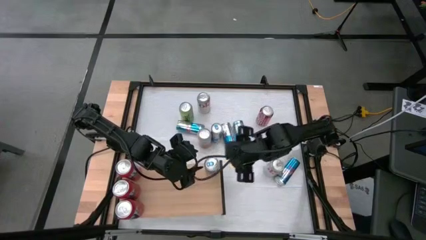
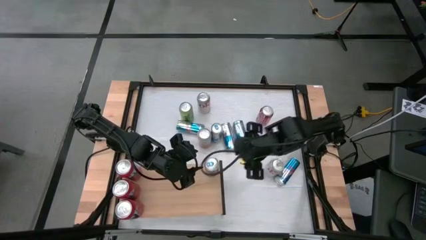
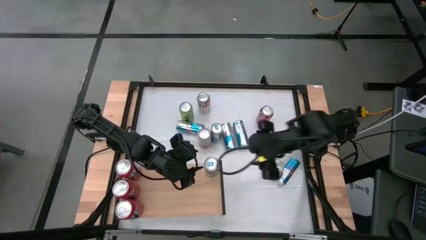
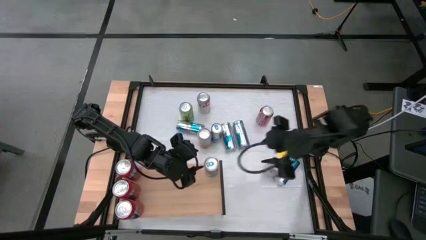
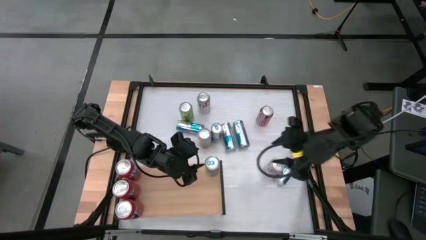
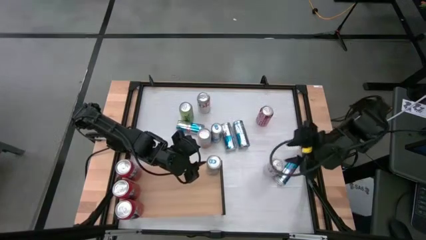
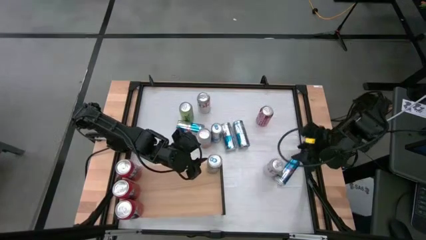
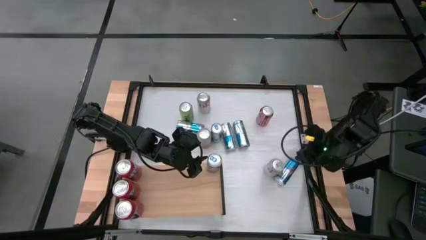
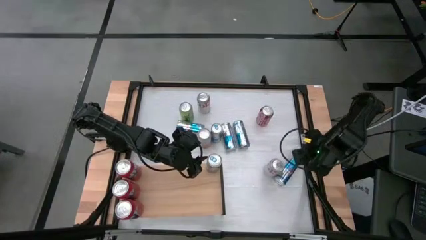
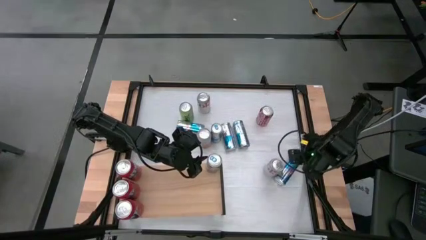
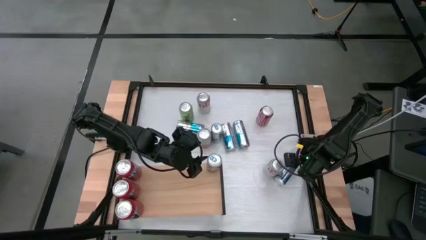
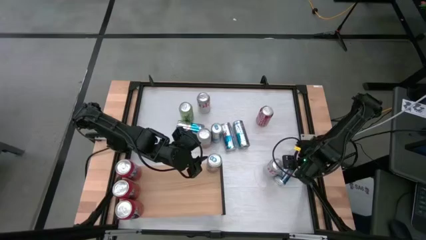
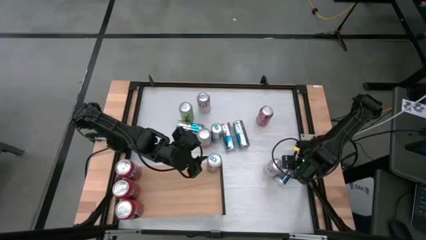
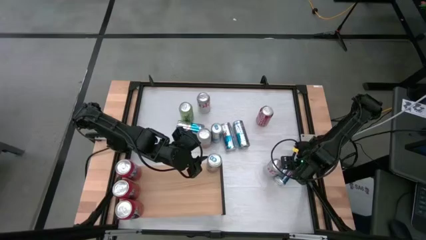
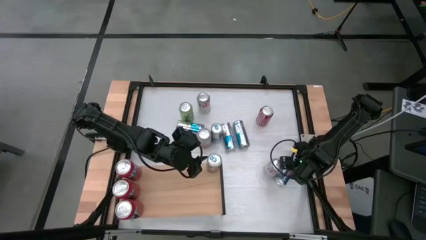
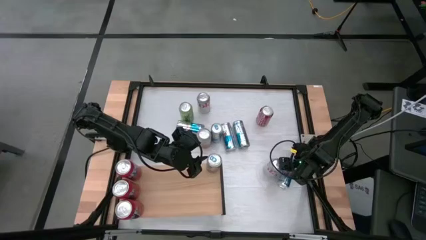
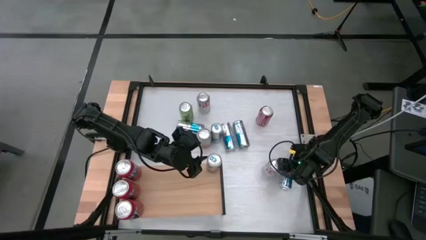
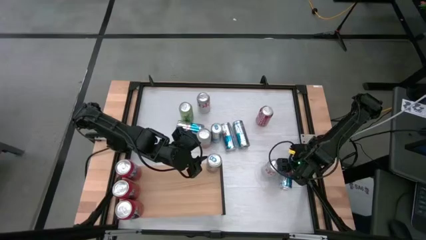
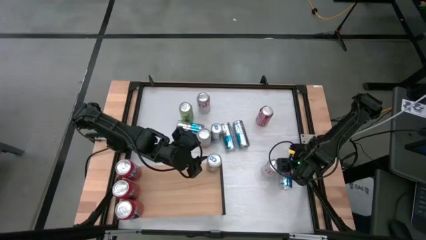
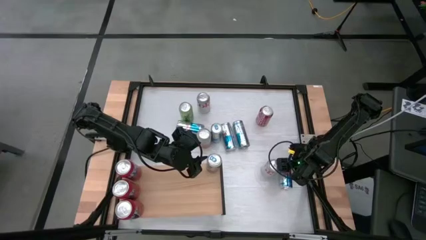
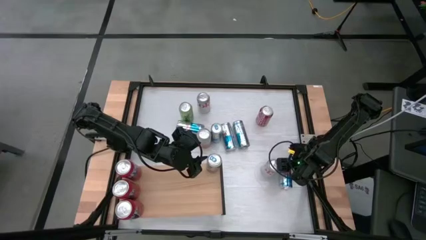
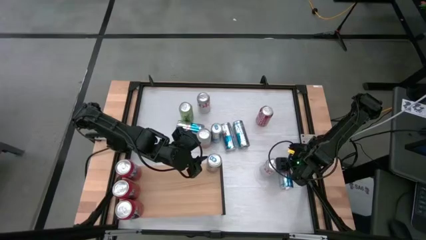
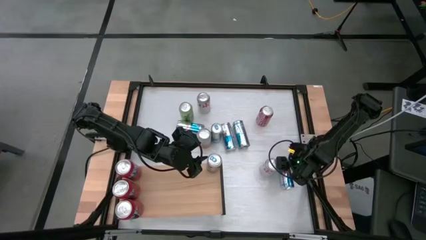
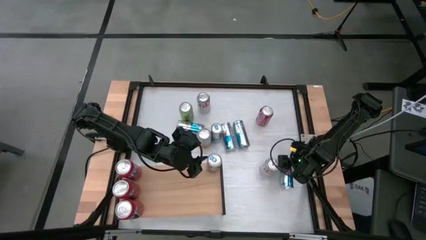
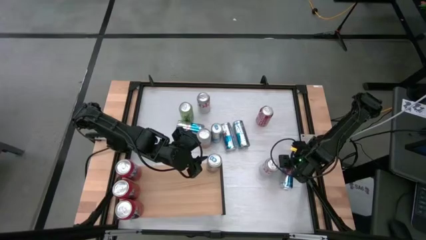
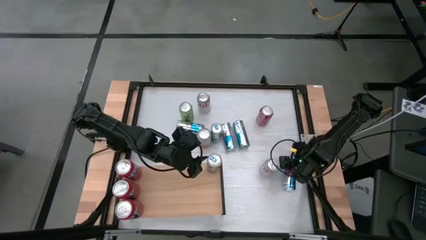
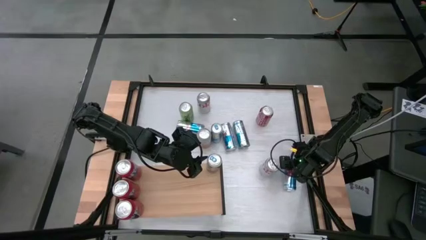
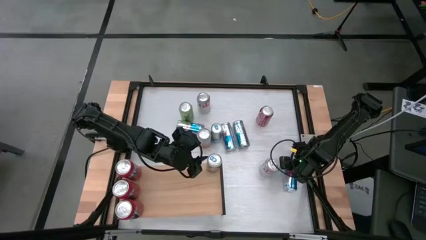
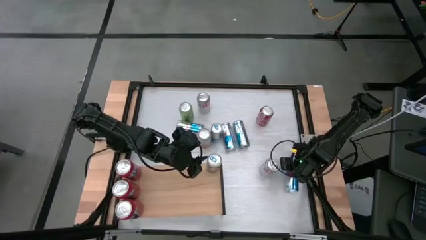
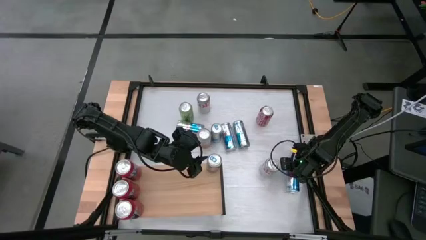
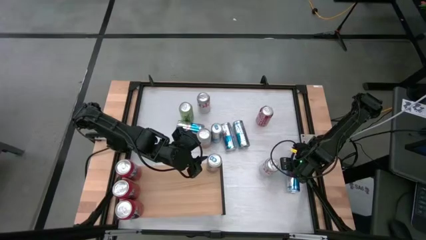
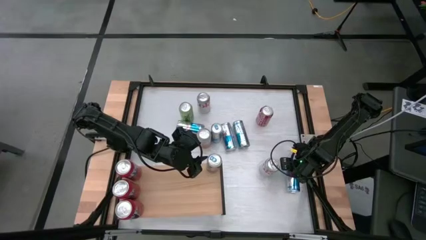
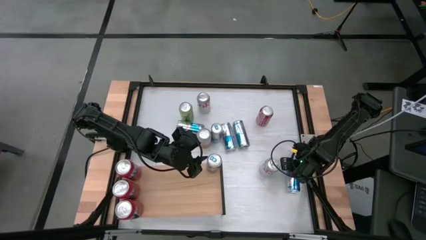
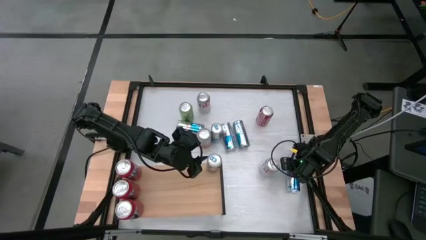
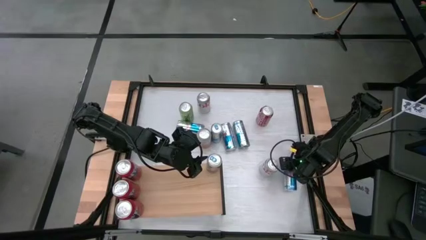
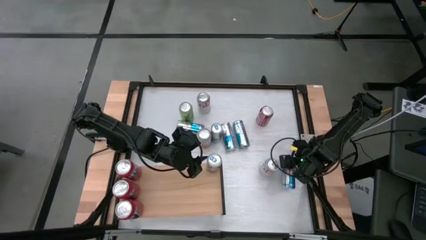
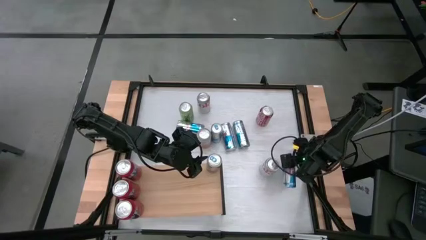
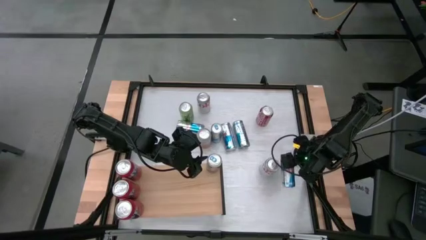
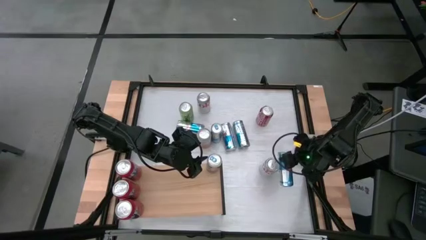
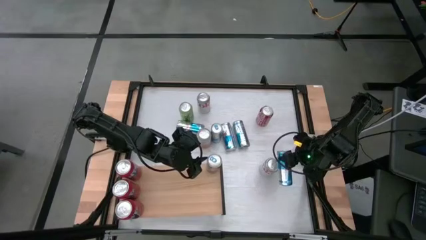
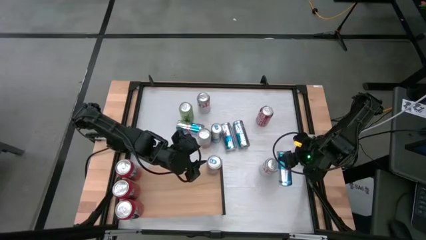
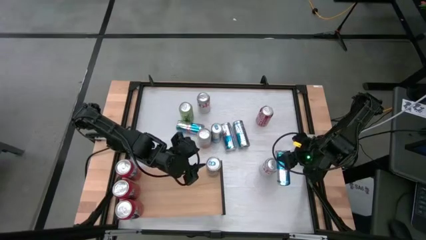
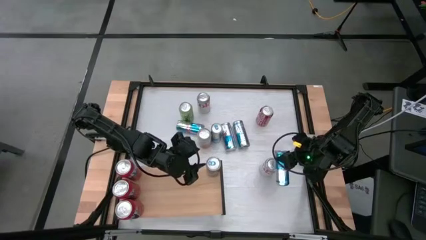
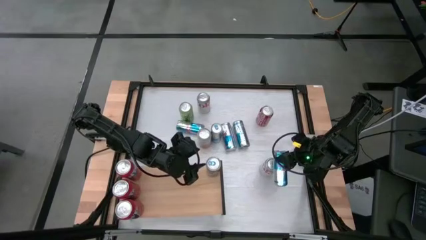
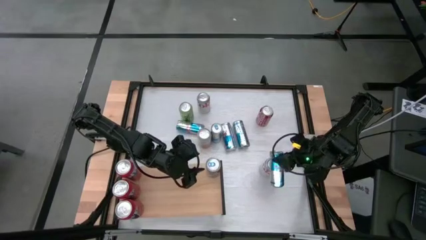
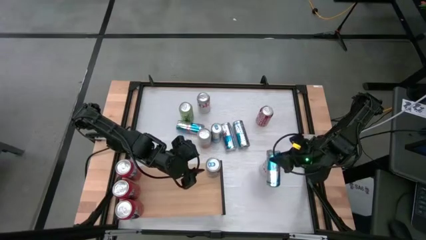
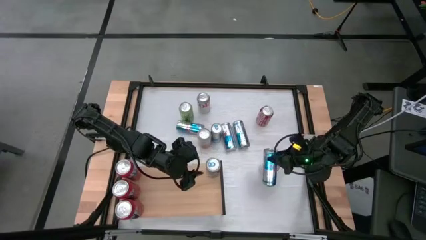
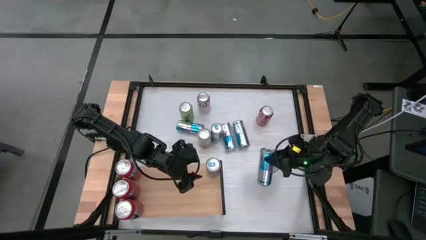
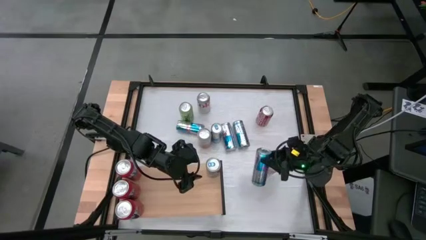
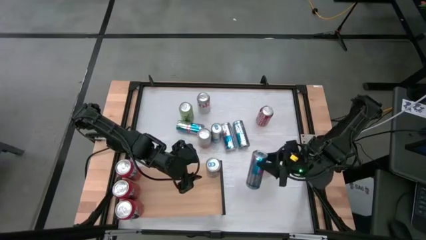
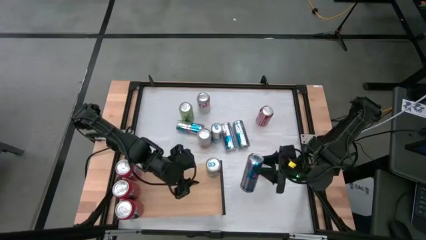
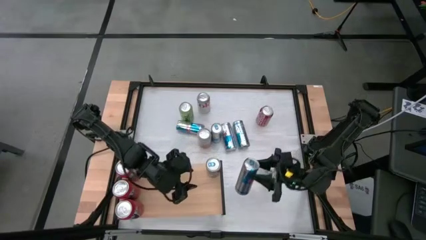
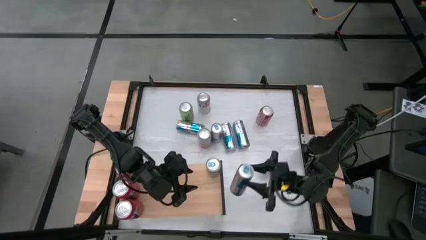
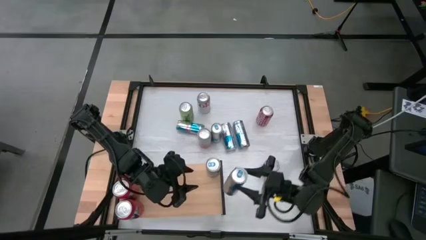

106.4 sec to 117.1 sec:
Task: Place canned beverage on shelf
Put the blue soda can on the shelf aligned with the blue soda can

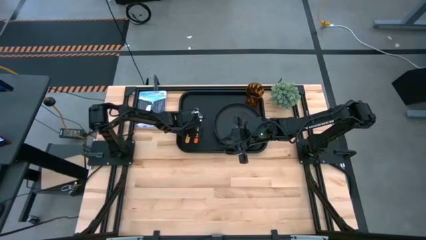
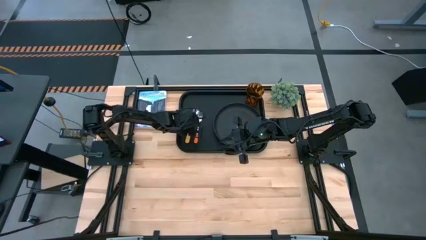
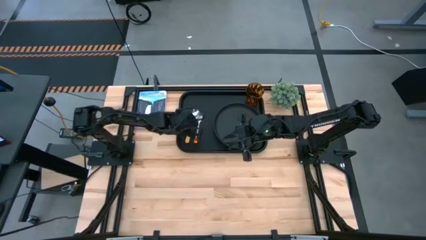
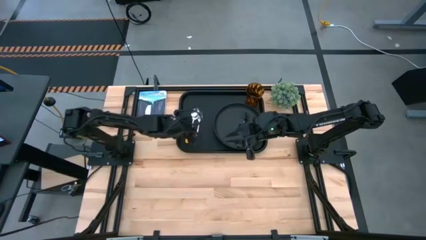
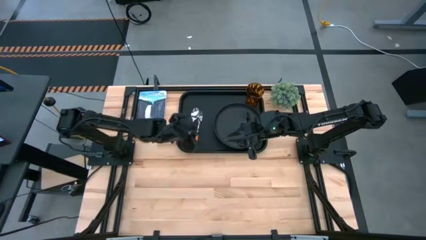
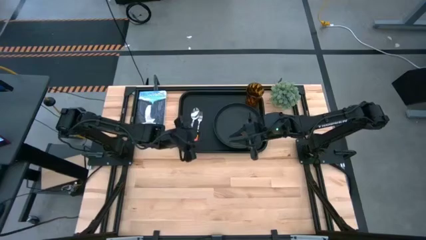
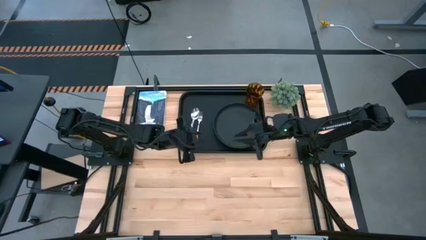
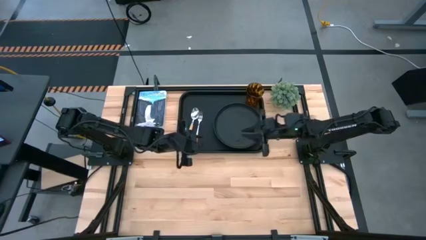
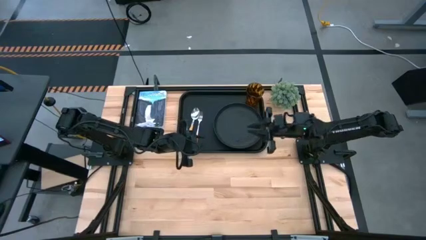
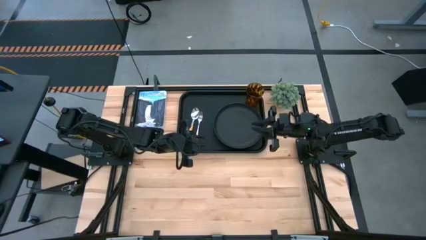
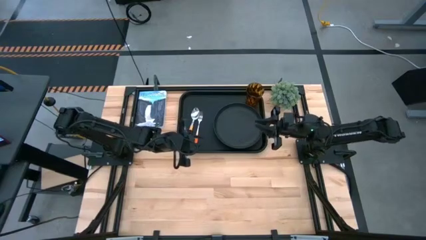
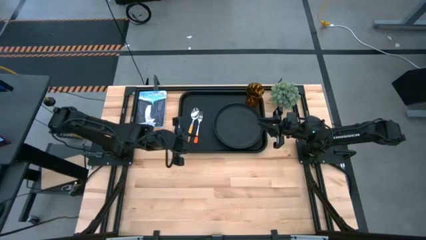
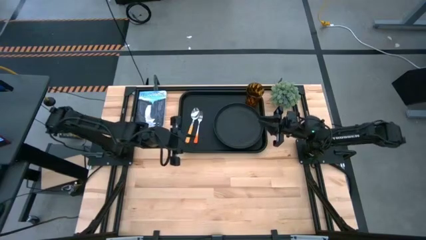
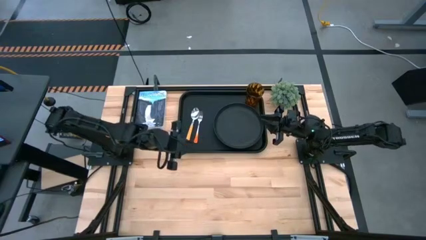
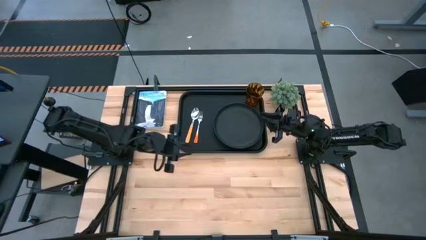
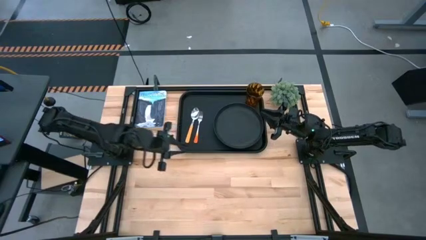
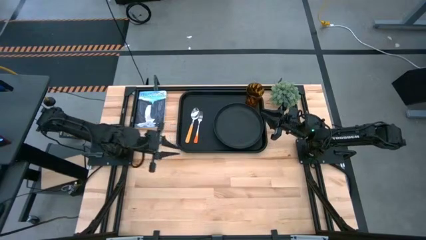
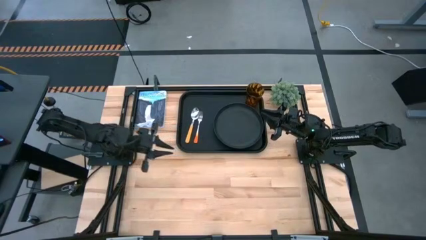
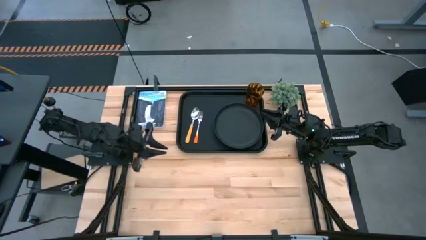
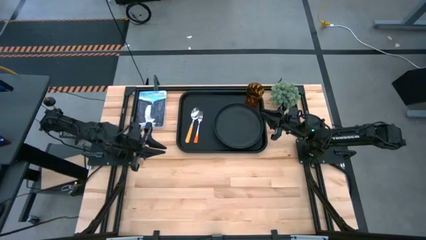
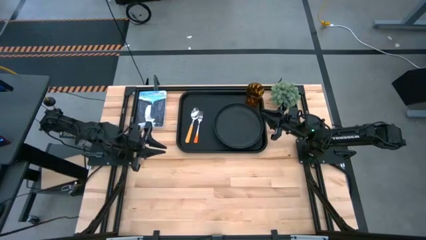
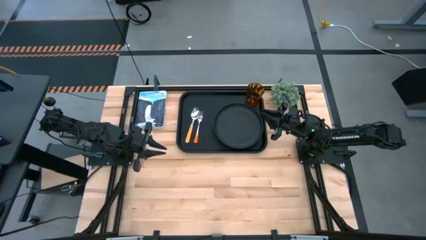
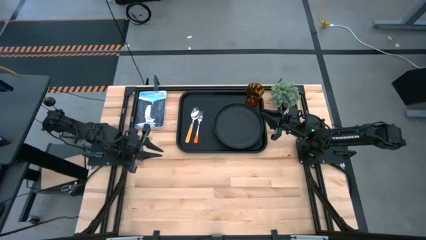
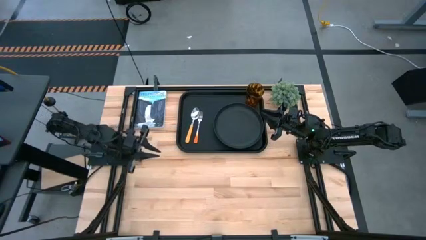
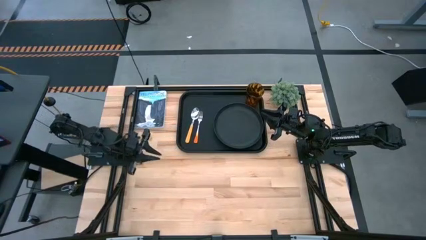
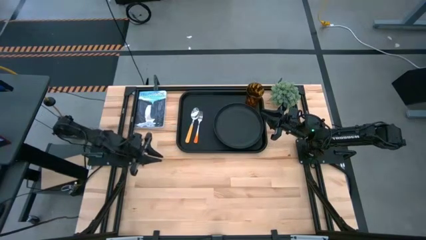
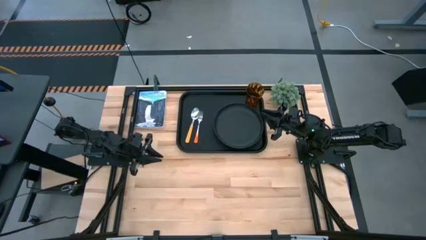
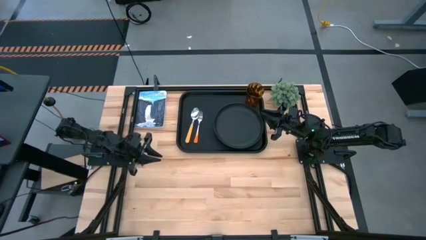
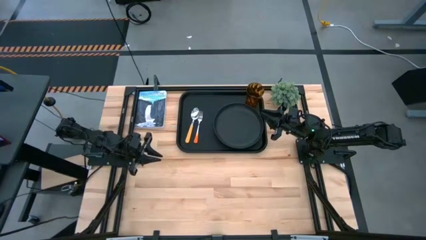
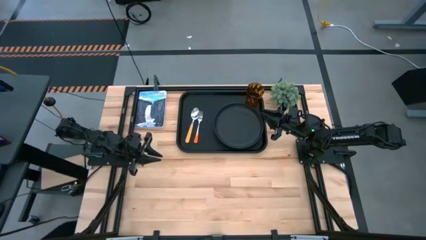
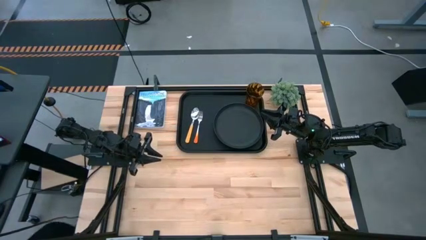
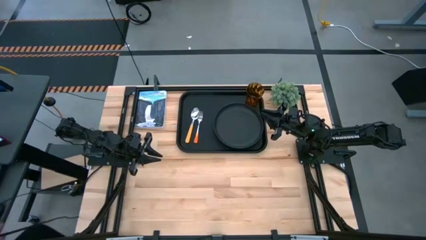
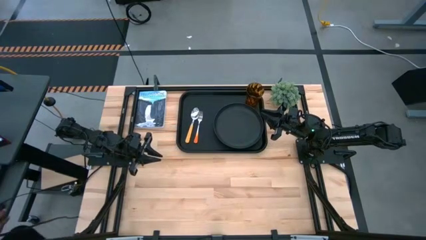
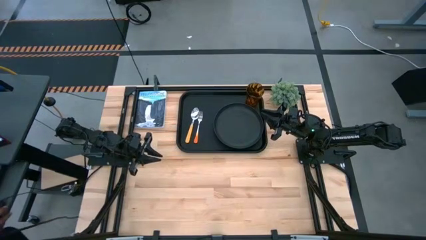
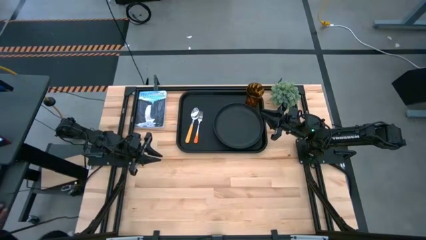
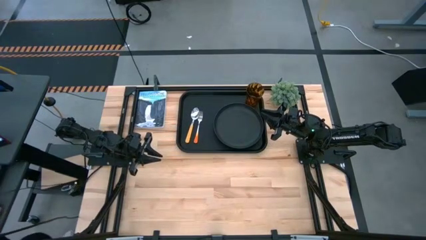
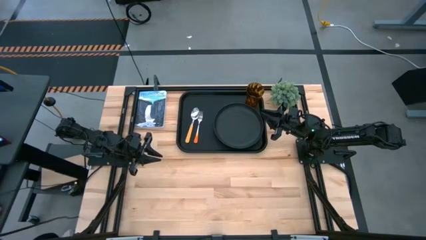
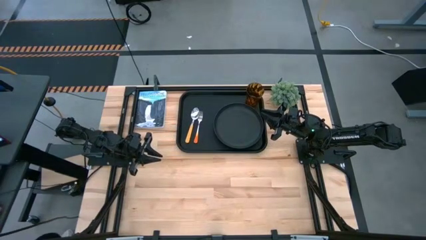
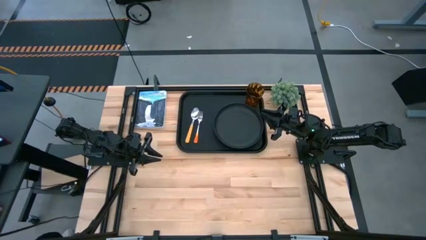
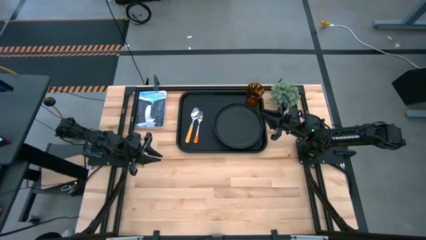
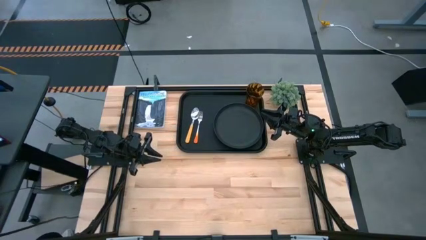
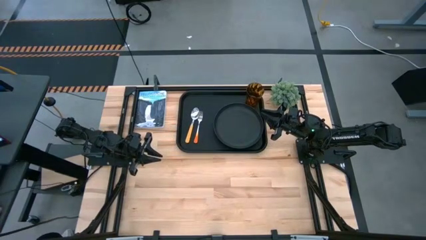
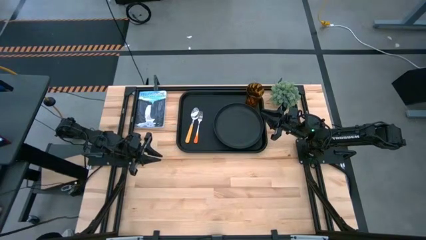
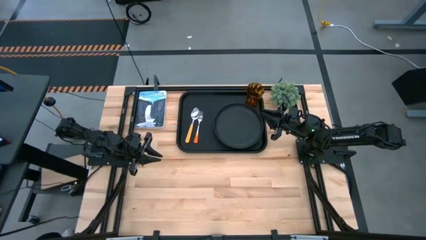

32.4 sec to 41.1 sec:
Task: Pick and place plate/cup/fork/spoon on tray
Return to Home Position
